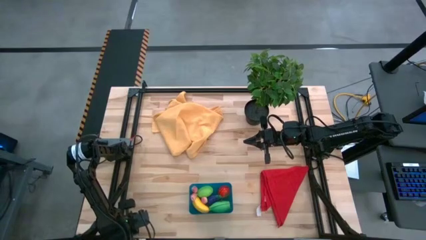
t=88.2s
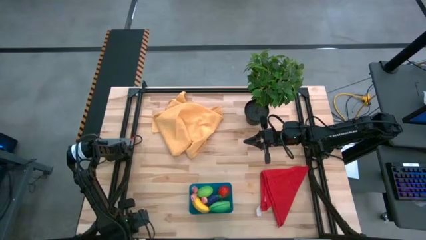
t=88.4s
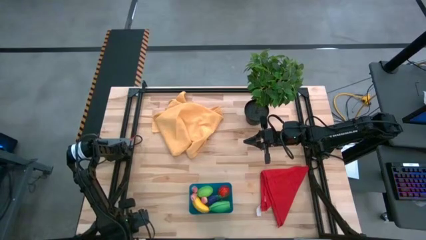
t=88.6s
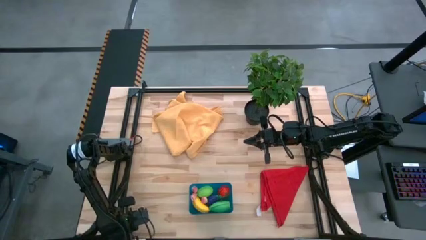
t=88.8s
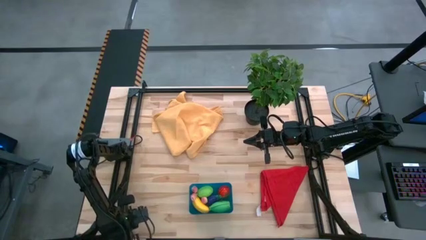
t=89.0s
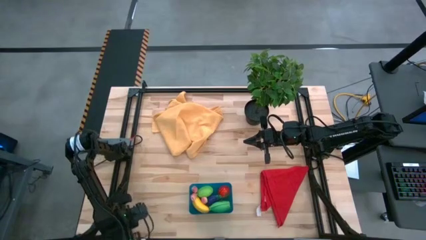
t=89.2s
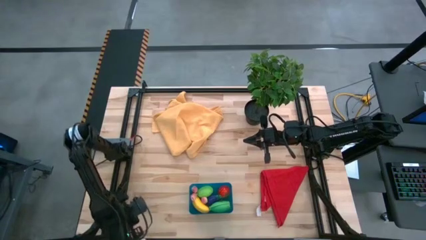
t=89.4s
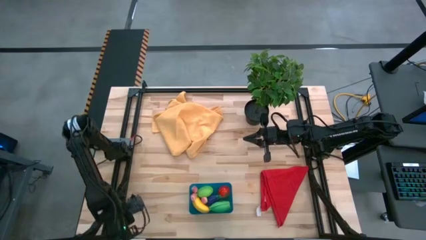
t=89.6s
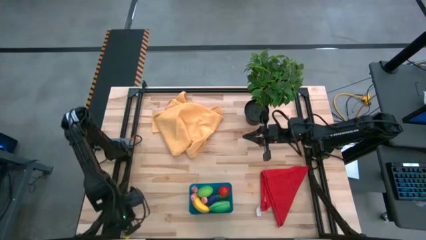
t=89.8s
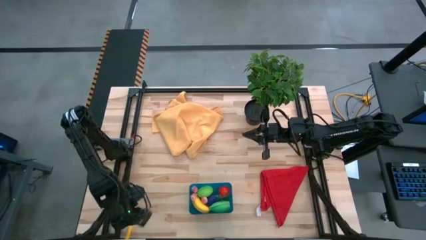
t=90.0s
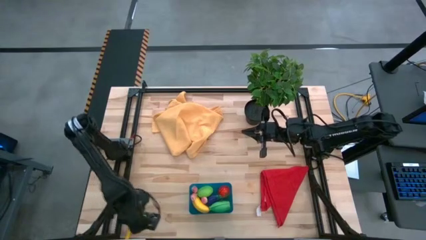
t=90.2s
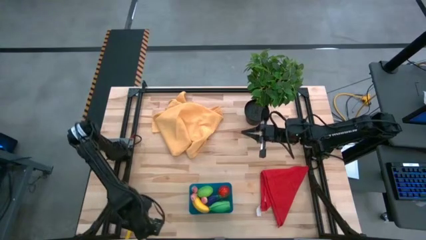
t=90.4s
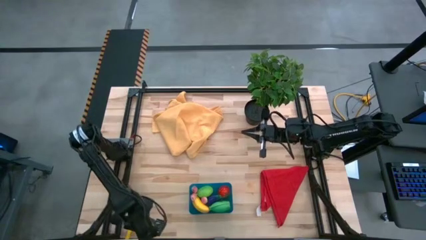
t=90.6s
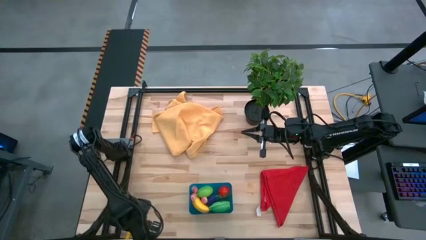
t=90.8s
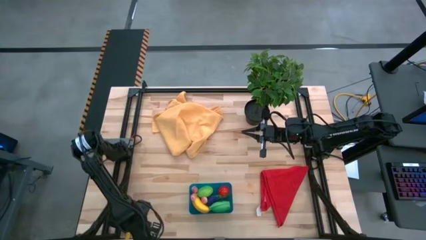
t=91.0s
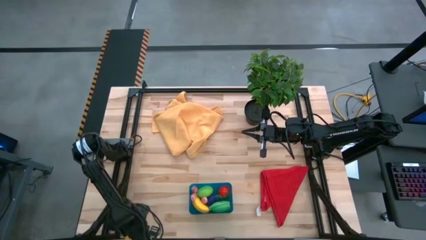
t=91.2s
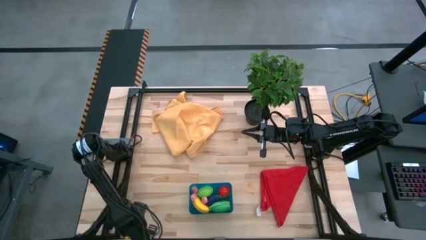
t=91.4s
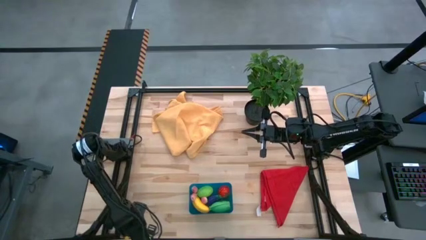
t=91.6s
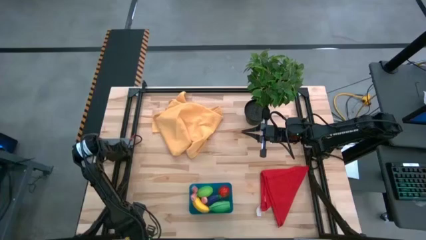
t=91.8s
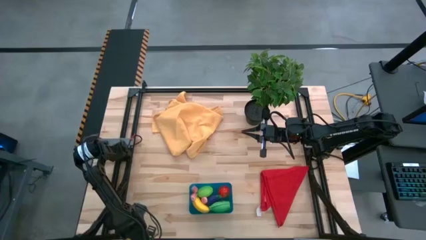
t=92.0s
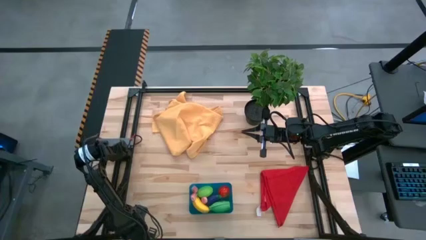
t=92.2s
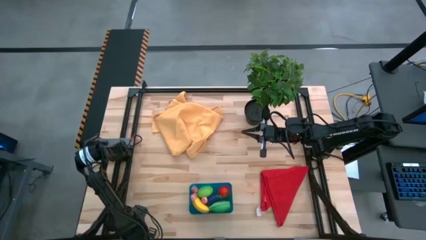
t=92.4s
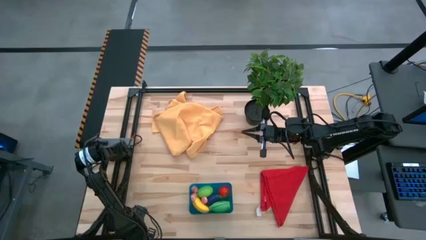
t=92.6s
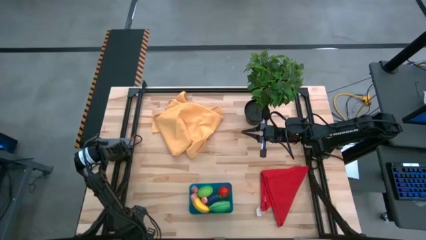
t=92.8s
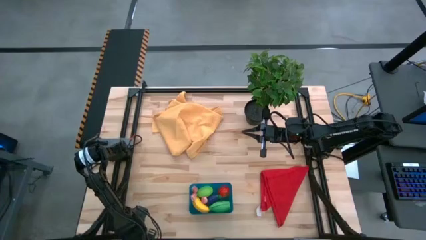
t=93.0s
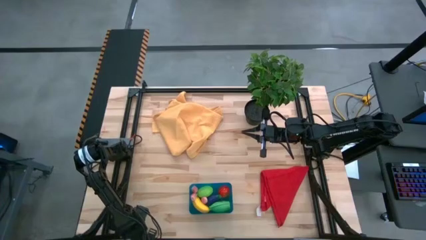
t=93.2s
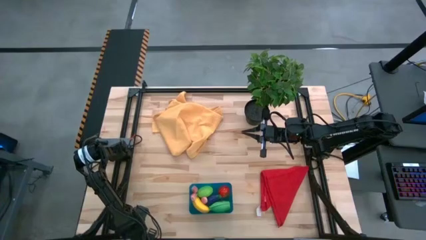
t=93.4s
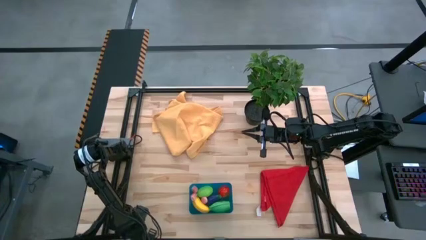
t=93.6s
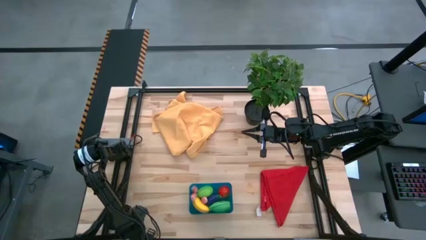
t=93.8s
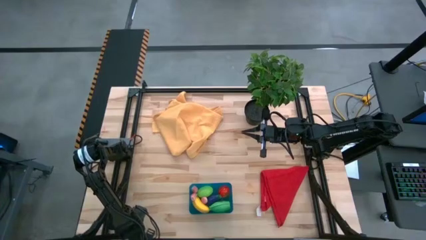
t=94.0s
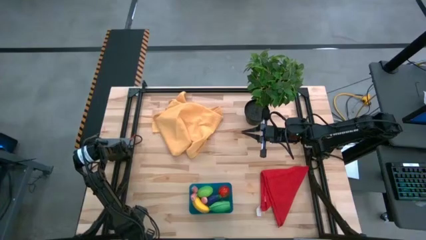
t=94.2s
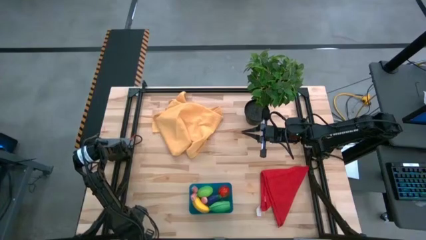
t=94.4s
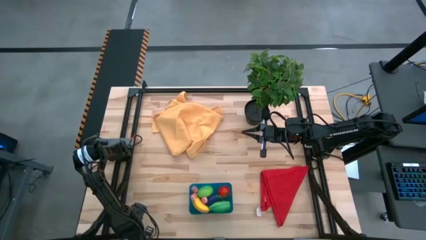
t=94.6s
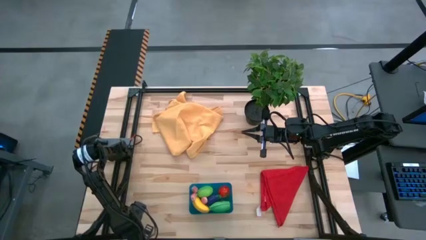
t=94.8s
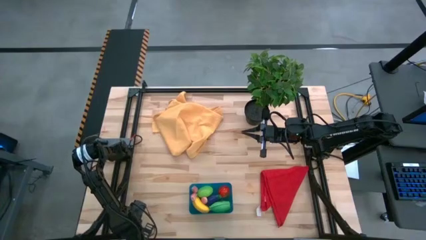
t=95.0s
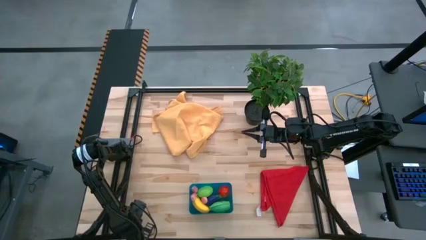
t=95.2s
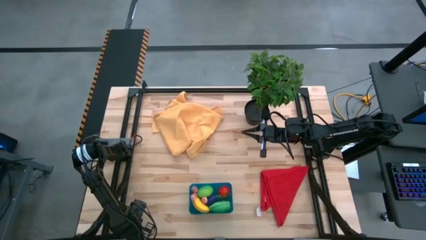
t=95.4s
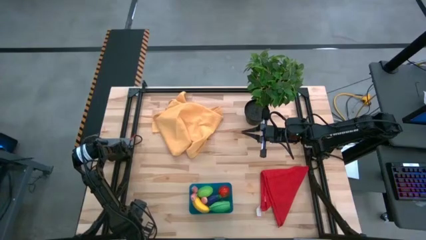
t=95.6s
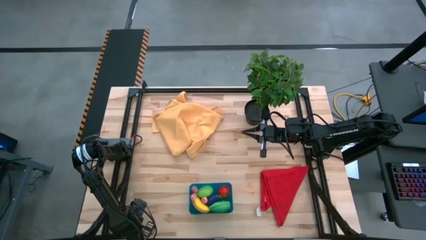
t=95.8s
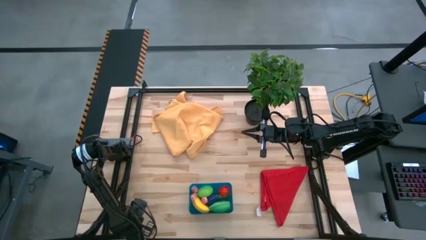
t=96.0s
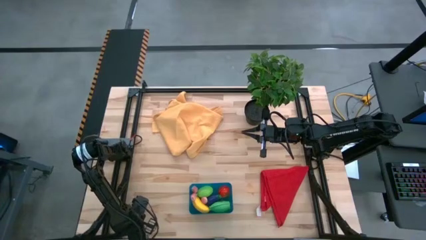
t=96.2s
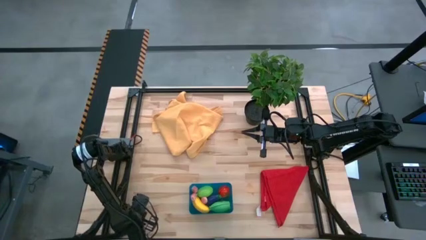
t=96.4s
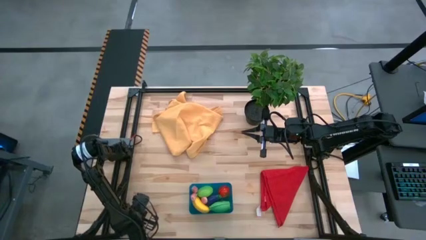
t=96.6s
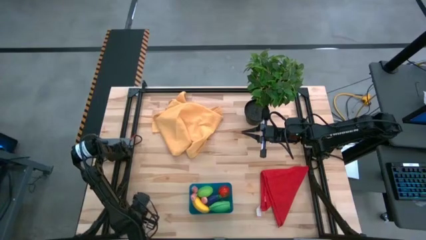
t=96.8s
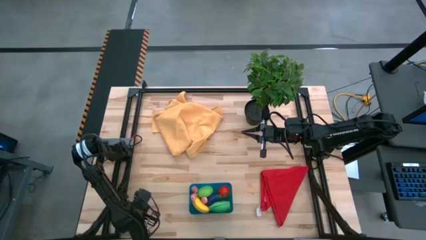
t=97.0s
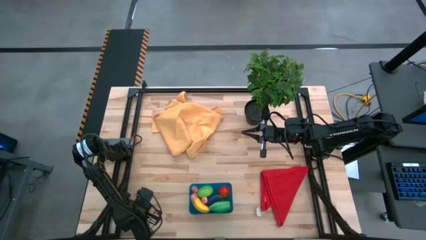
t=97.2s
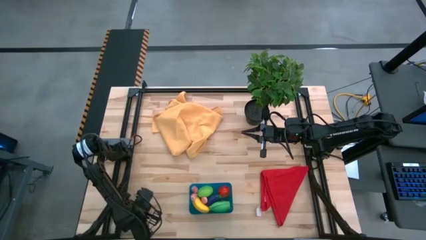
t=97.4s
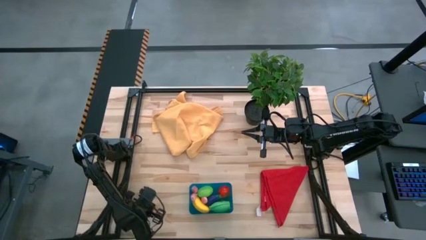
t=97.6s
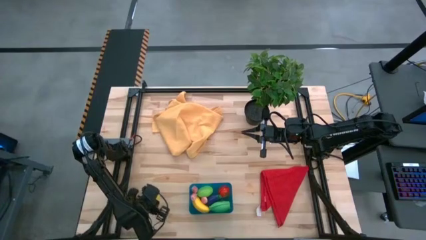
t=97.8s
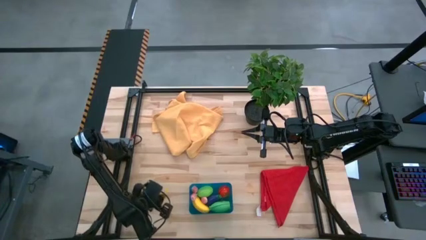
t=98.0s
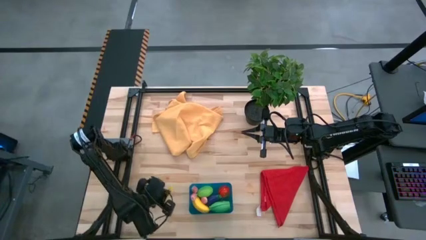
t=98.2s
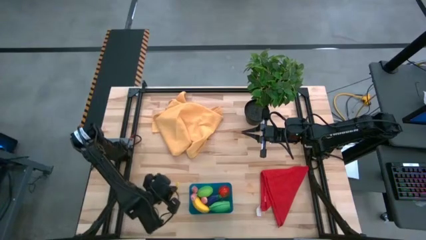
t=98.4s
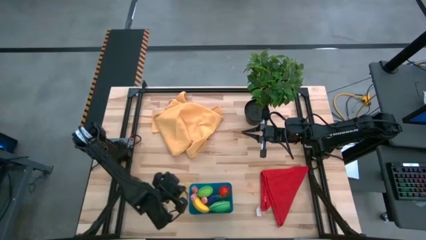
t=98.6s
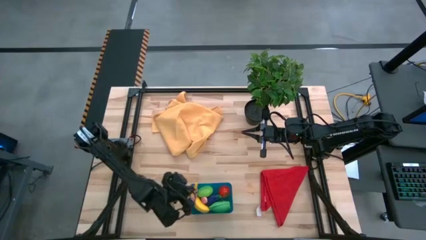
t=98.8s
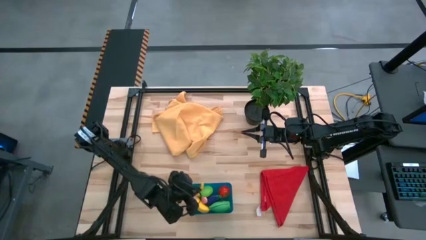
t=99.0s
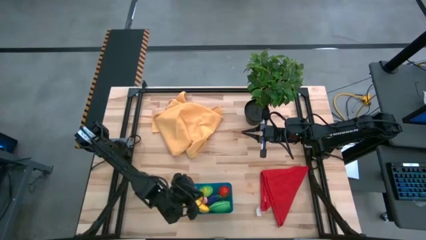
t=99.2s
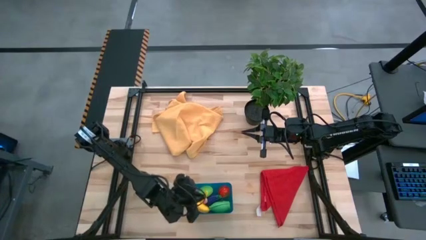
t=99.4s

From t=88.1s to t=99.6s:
Task: Pick and placing Produce into tupperware
Put the yellow corn into the blue bin
